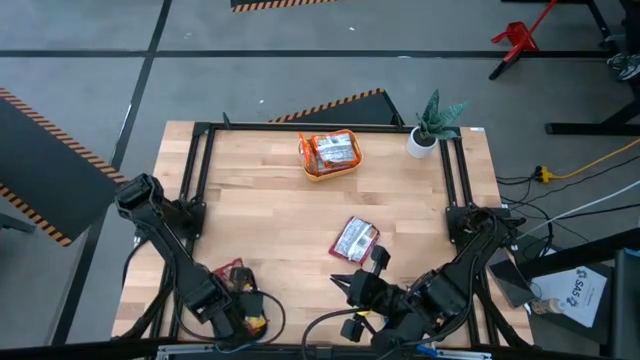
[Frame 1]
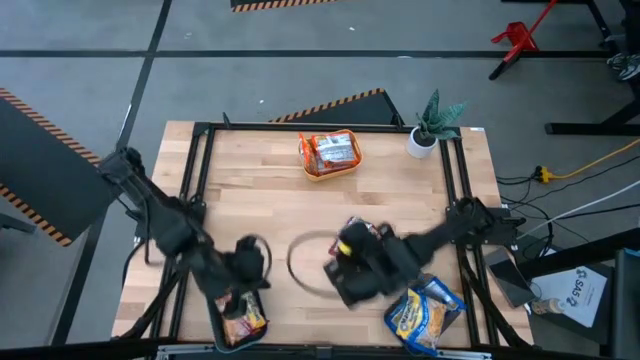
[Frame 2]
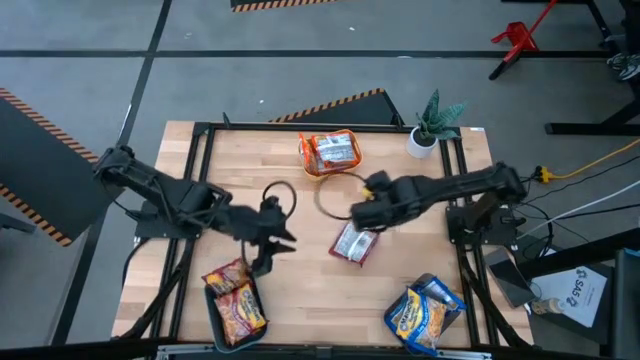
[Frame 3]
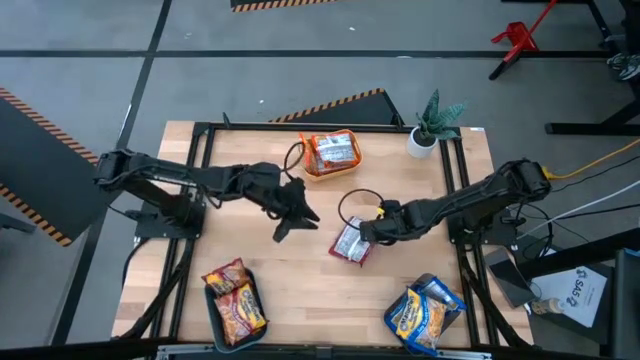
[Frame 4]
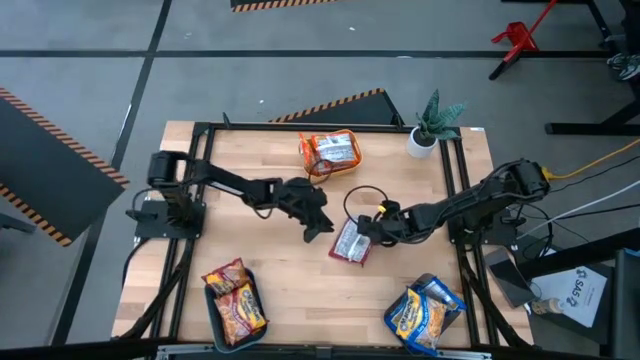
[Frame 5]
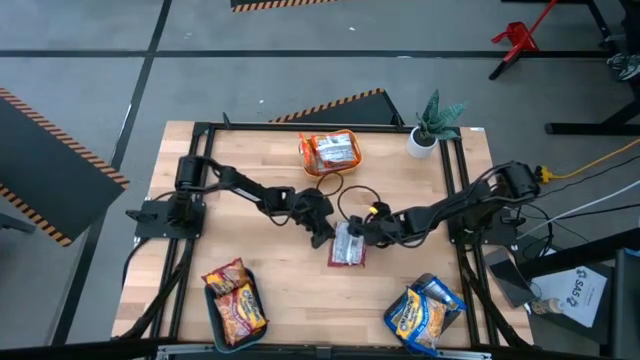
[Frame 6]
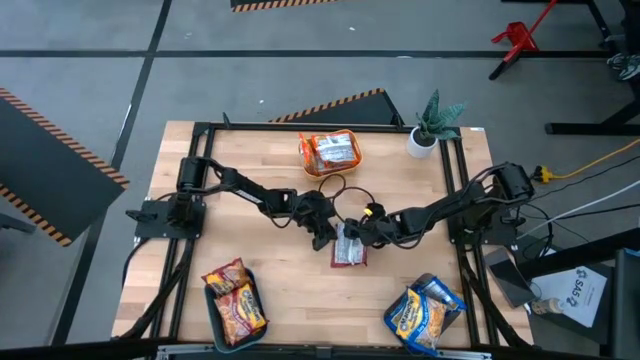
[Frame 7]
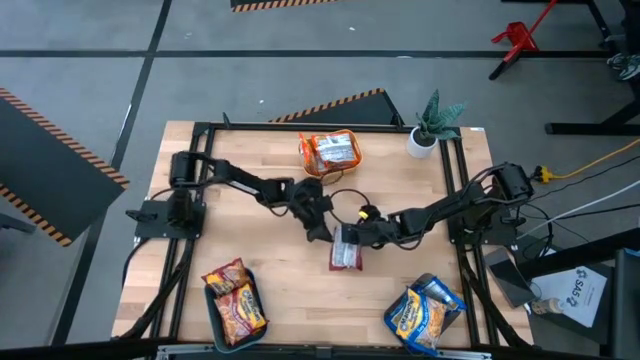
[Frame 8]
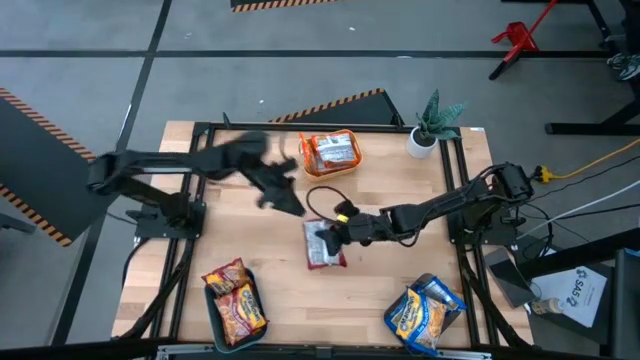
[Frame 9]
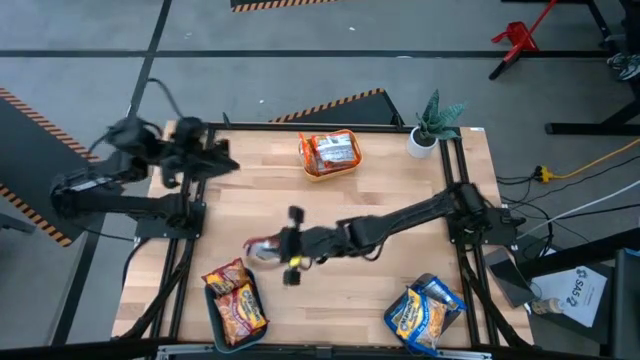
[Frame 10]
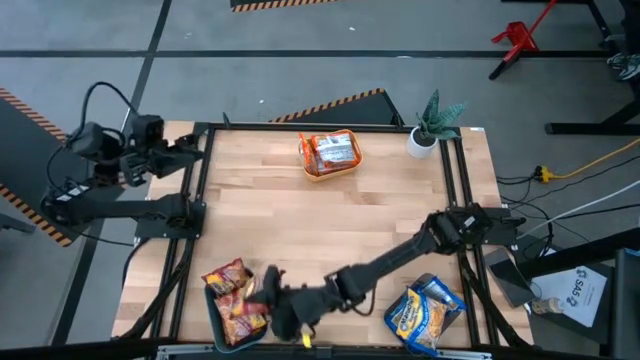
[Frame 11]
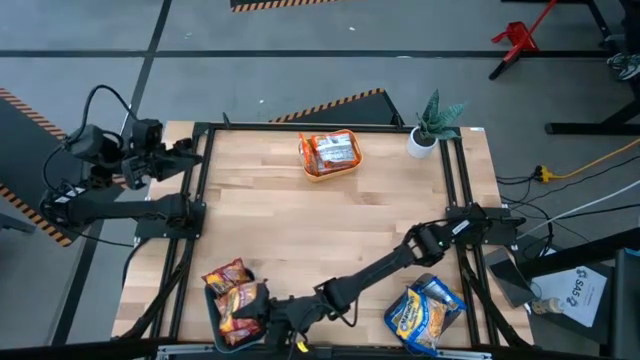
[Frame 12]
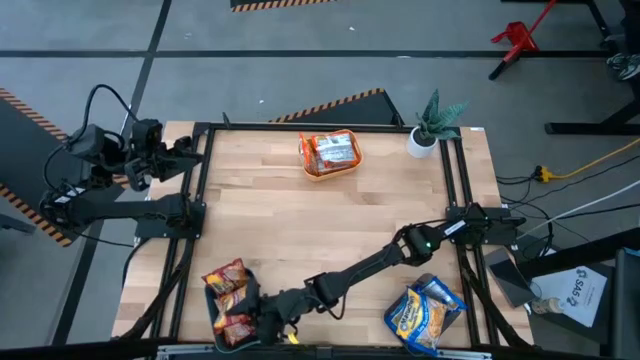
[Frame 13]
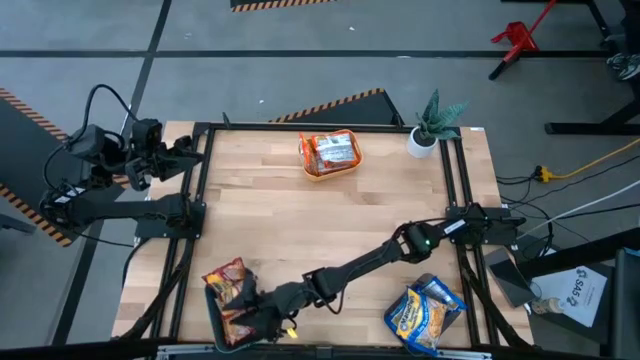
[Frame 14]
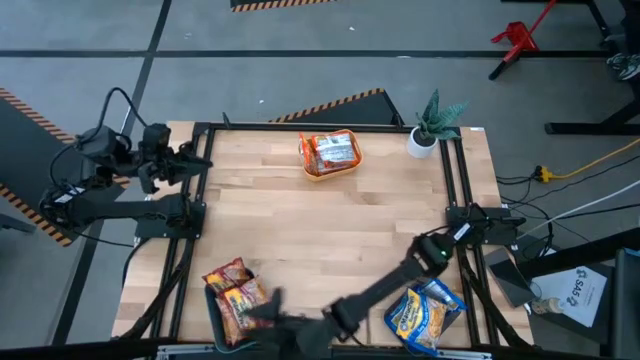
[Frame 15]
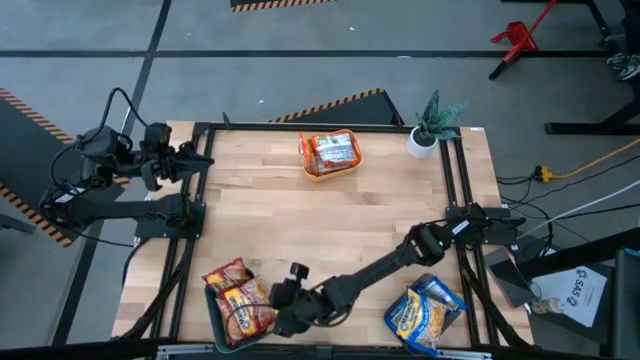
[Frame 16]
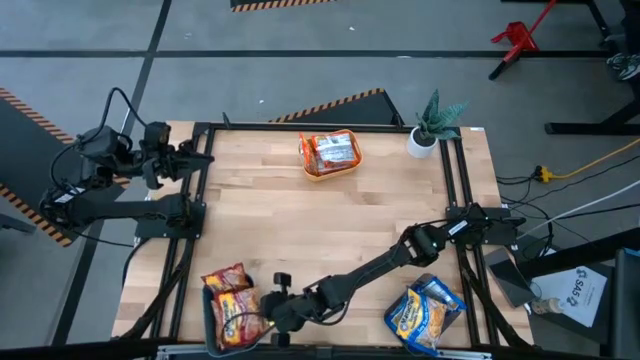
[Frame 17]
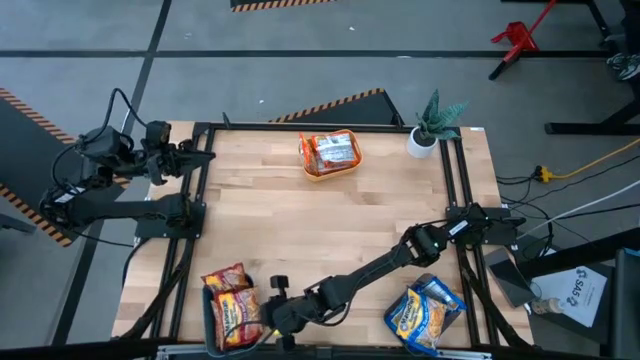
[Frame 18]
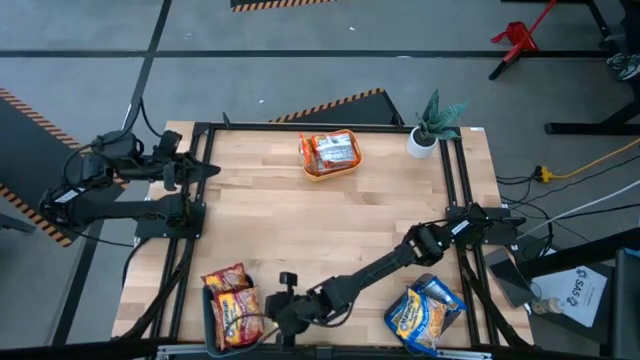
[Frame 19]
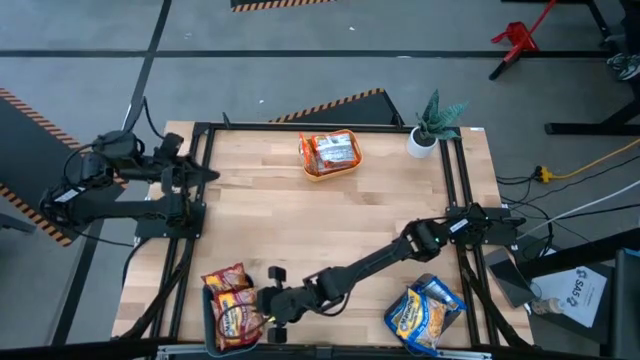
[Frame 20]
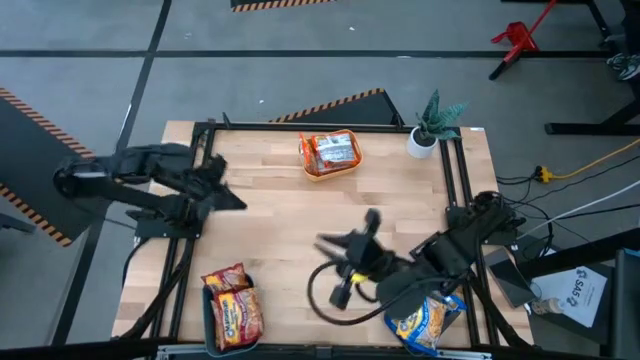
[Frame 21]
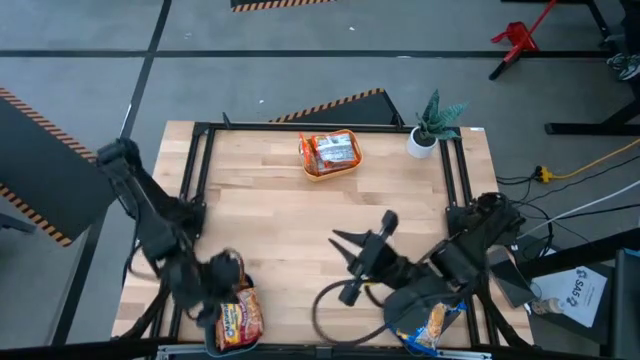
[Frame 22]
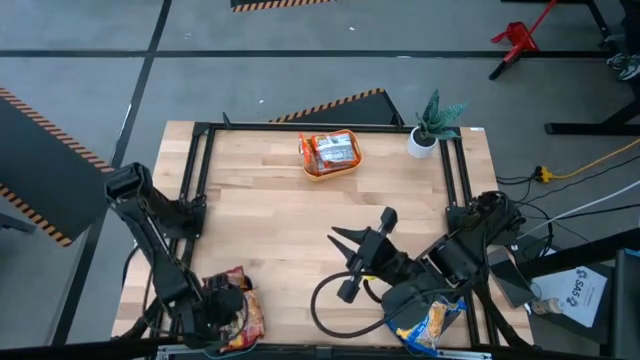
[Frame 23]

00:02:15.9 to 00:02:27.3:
Task: Sort Maruchan noodles
Put the red noodle pack into the blue bin

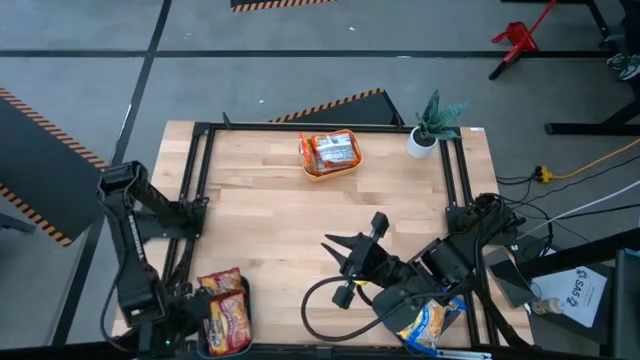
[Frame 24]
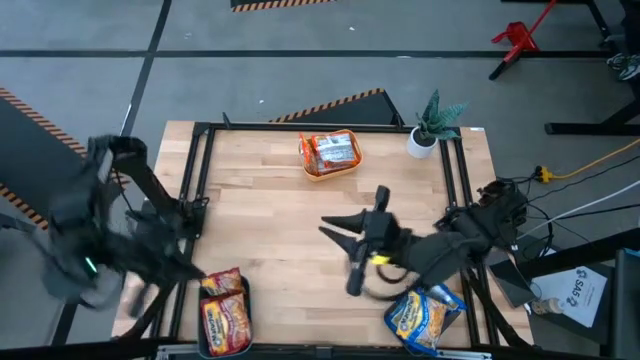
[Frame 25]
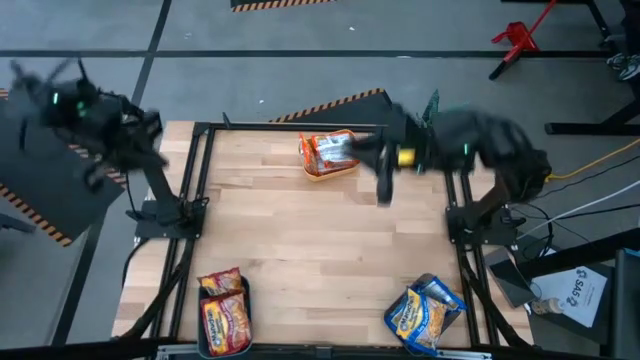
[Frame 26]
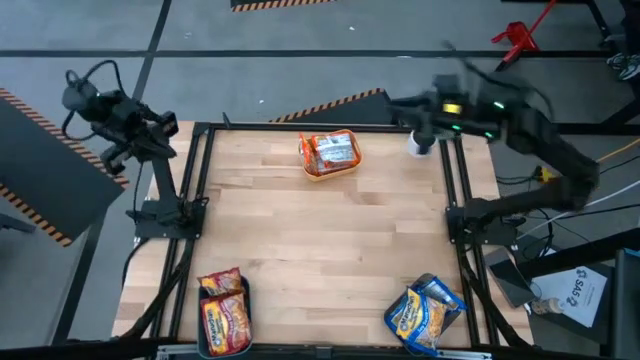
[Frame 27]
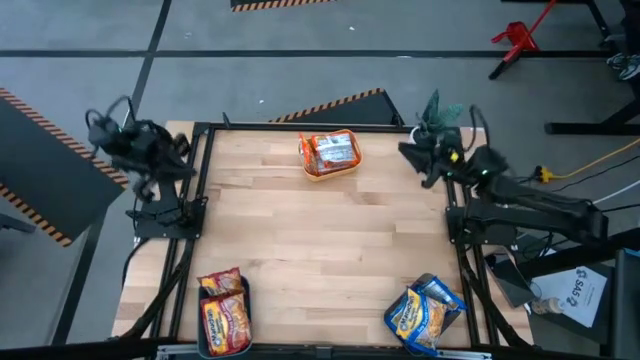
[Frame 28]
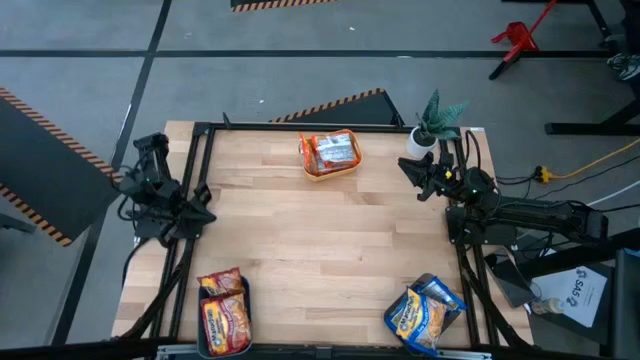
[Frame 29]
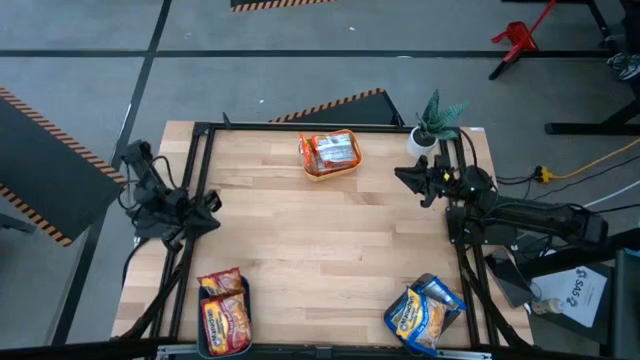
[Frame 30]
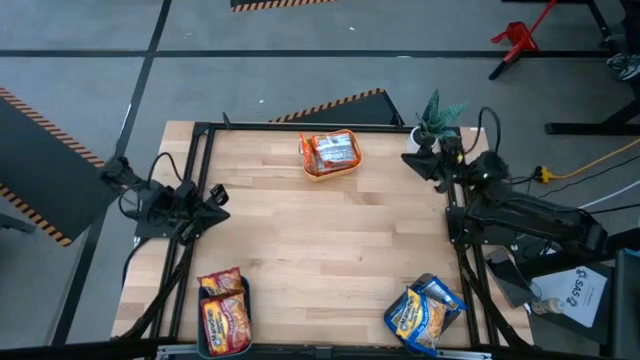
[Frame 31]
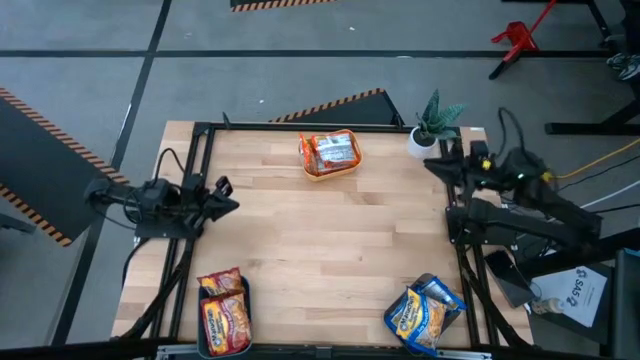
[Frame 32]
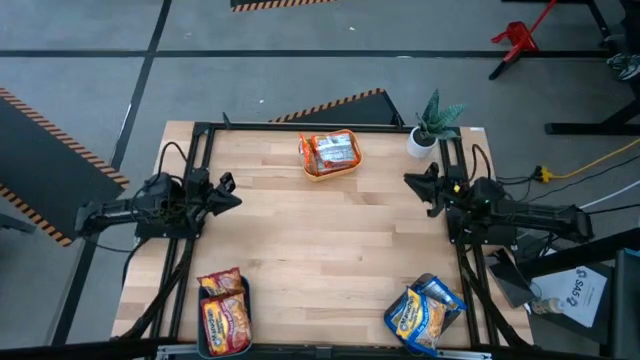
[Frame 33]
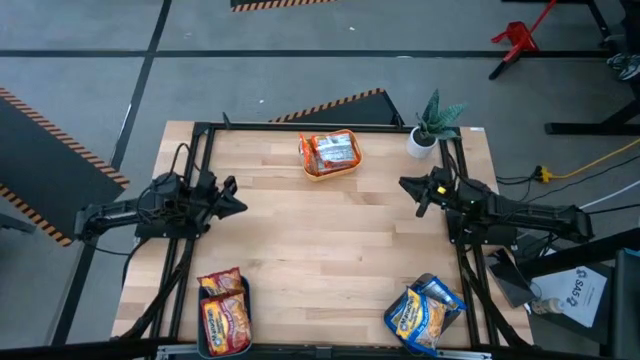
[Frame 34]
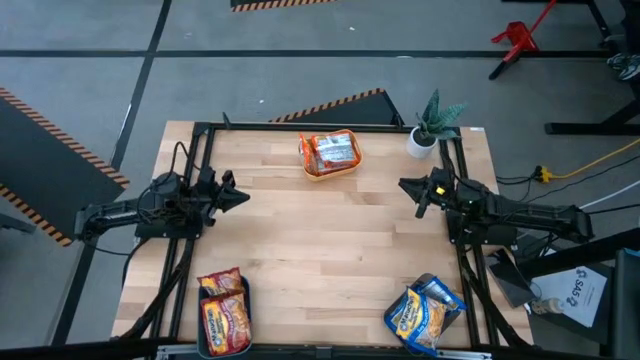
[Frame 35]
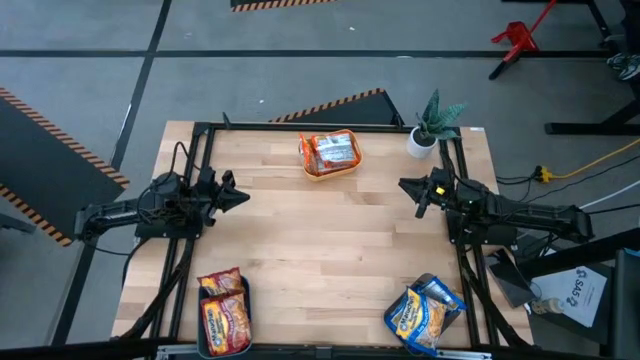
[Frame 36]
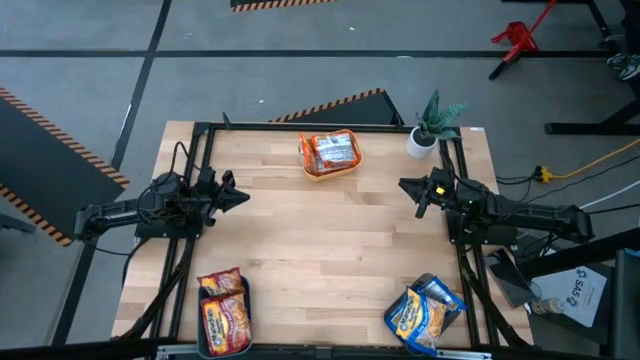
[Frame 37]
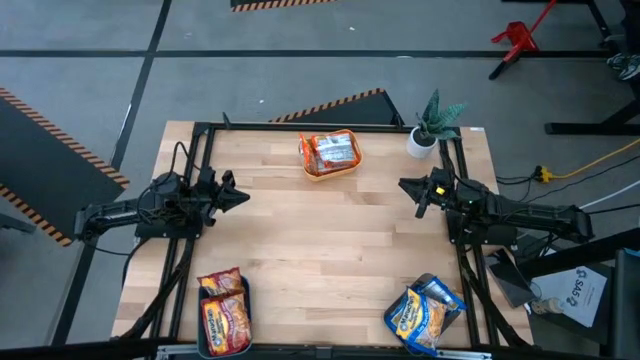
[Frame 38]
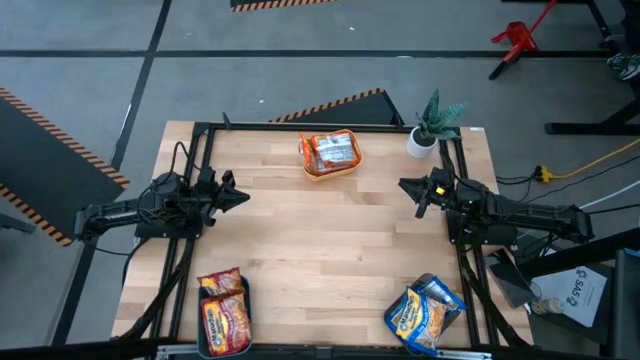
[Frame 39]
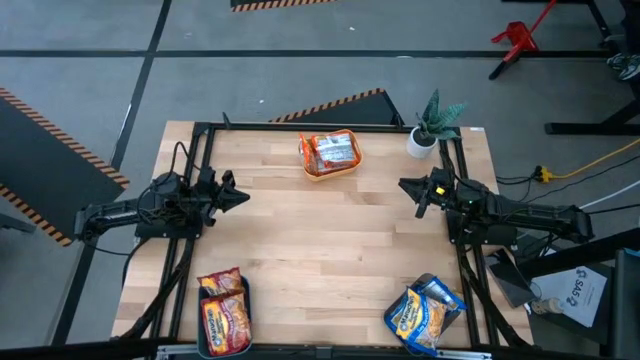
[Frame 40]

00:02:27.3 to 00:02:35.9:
Return to Home Position

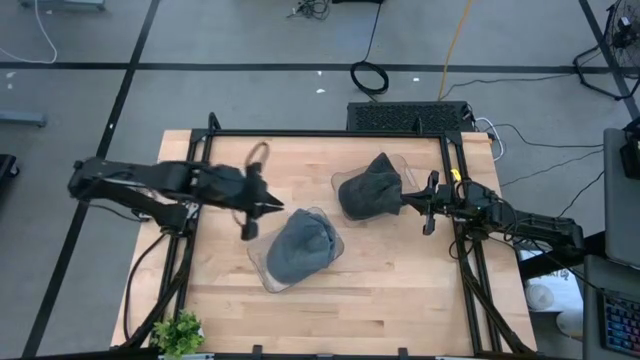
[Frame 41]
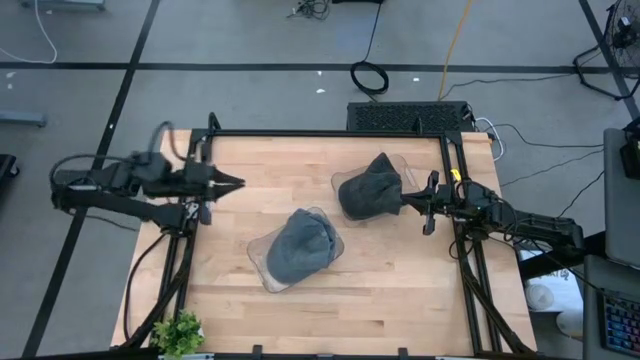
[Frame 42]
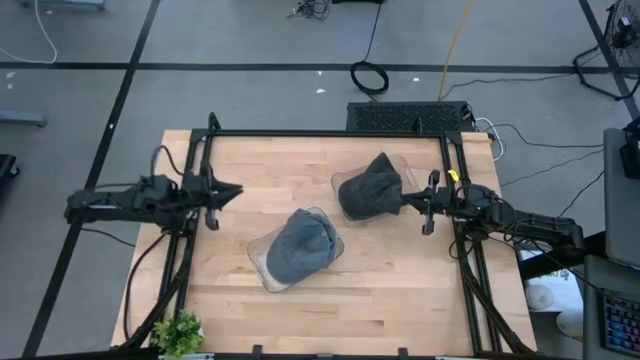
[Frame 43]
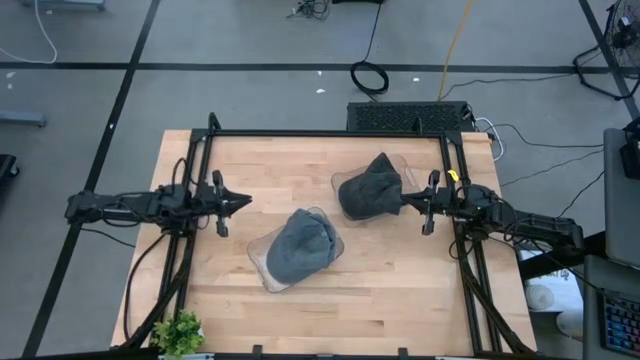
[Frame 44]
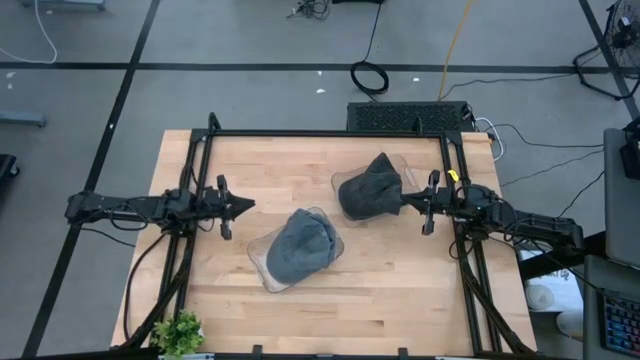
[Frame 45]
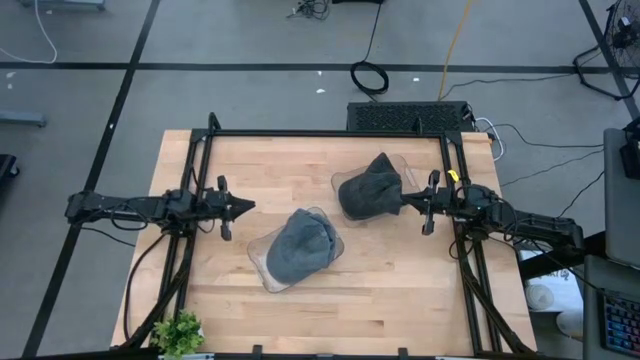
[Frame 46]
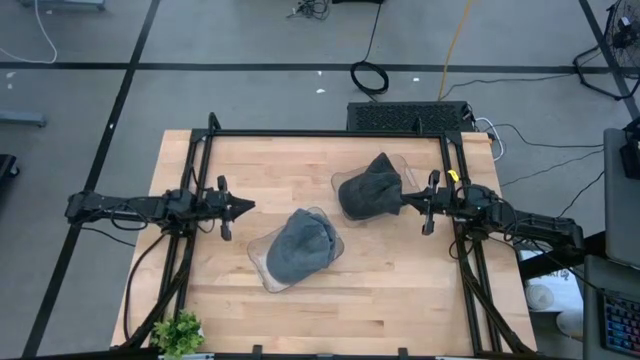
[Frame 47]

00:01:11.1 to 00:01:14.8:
Task: Pick & Place hat
Return to Home Position
